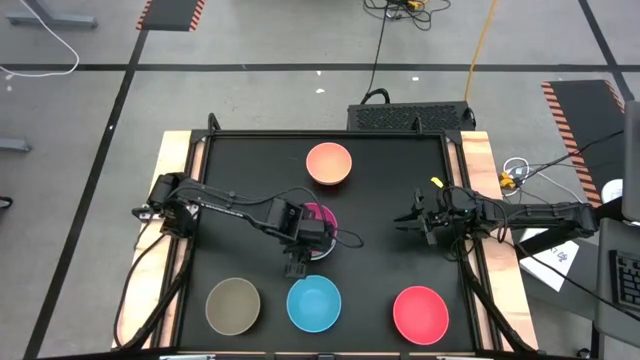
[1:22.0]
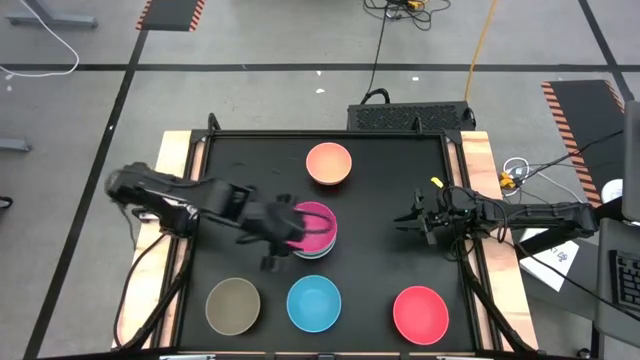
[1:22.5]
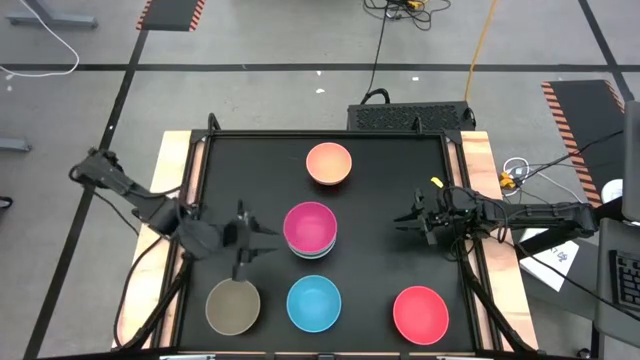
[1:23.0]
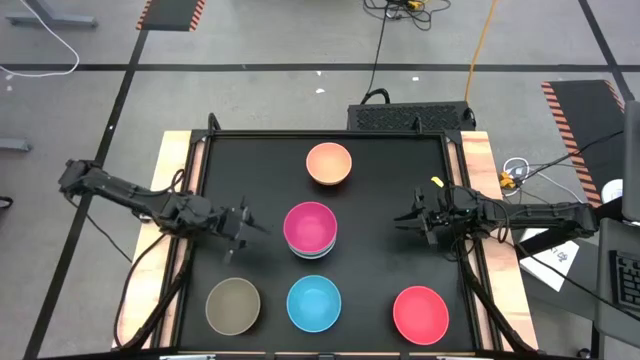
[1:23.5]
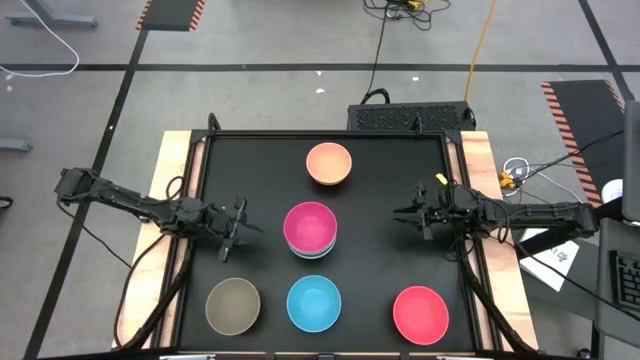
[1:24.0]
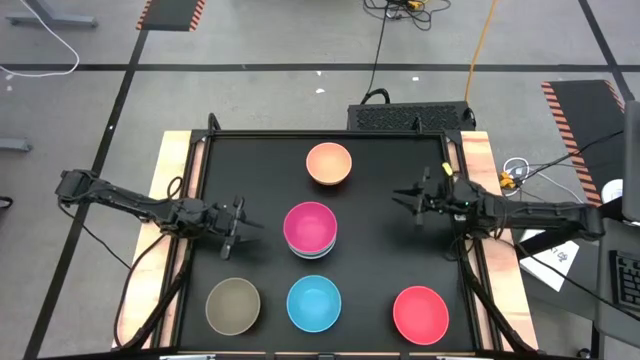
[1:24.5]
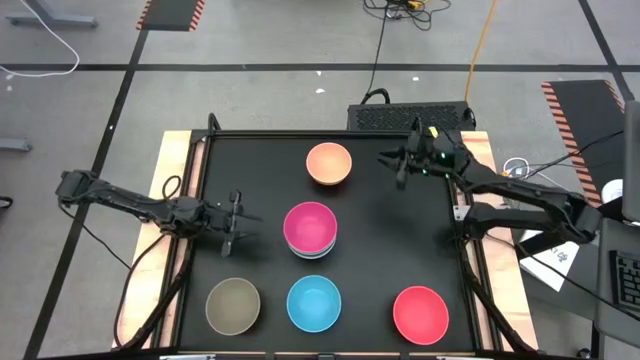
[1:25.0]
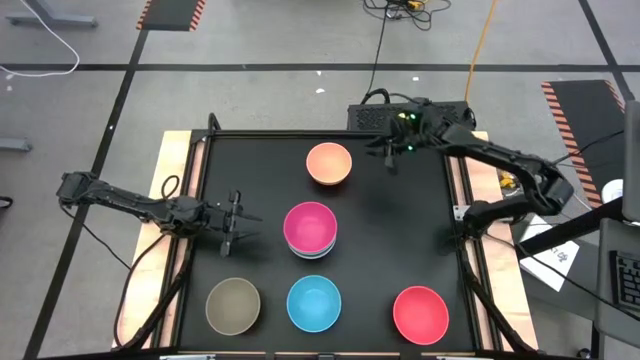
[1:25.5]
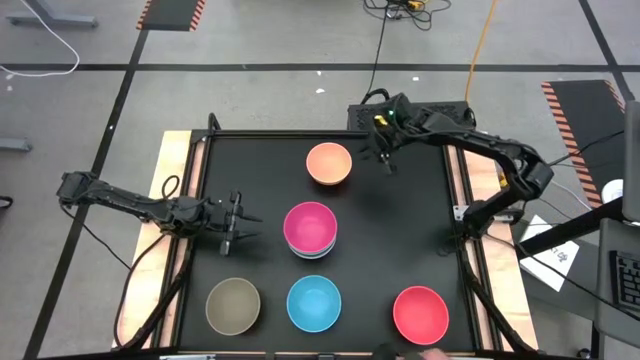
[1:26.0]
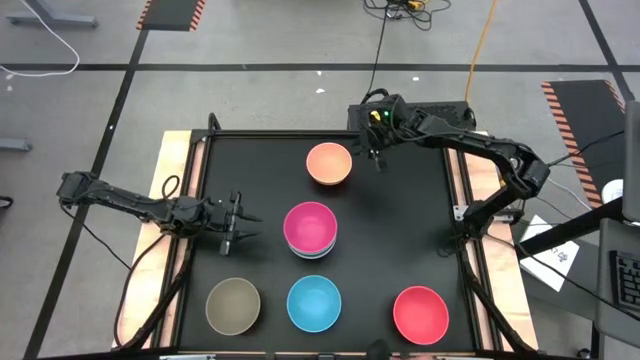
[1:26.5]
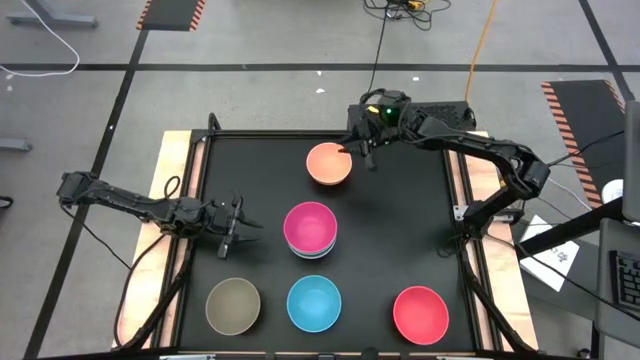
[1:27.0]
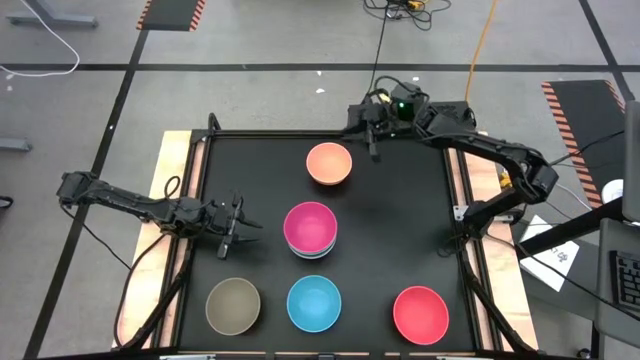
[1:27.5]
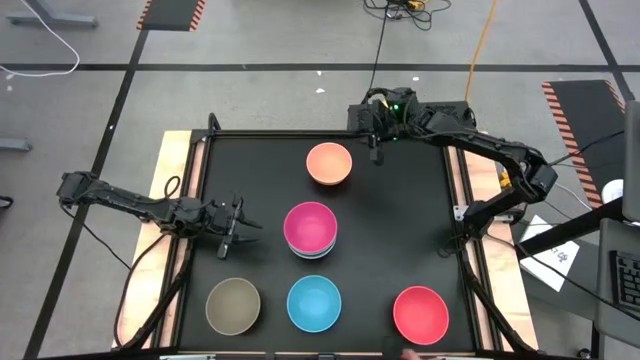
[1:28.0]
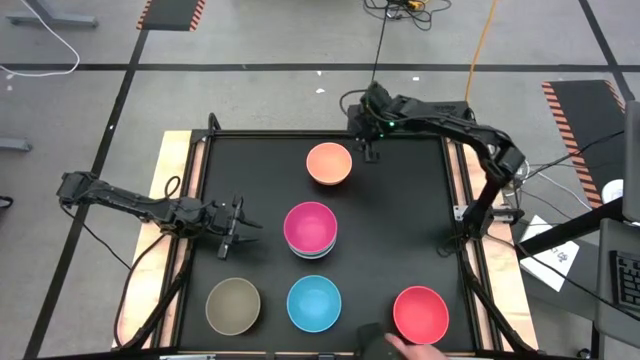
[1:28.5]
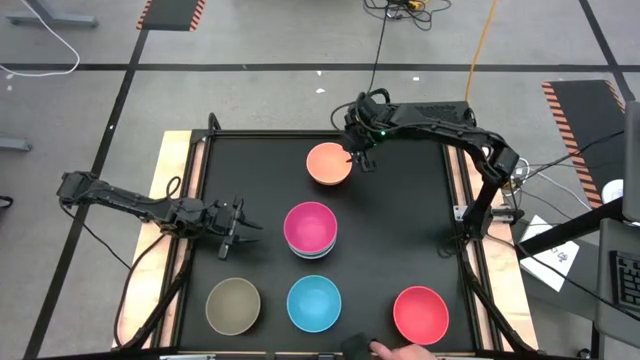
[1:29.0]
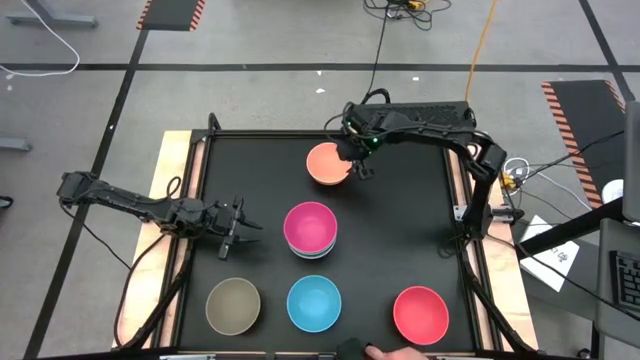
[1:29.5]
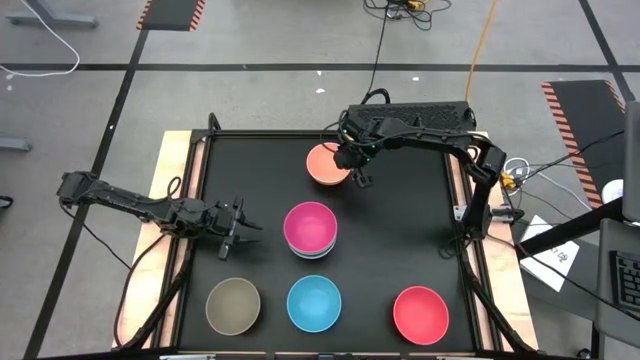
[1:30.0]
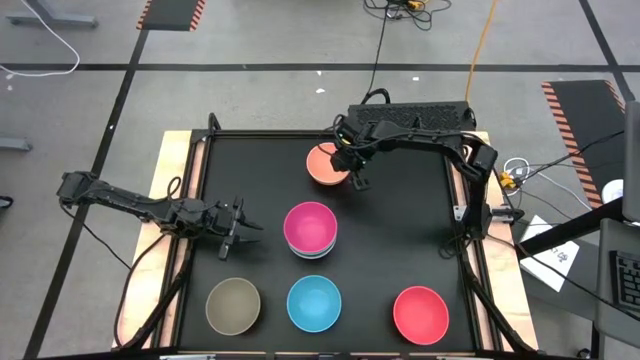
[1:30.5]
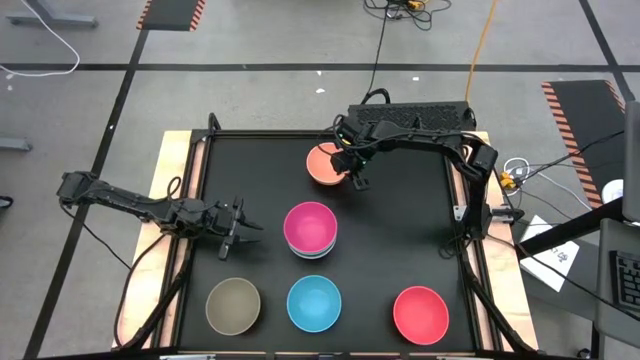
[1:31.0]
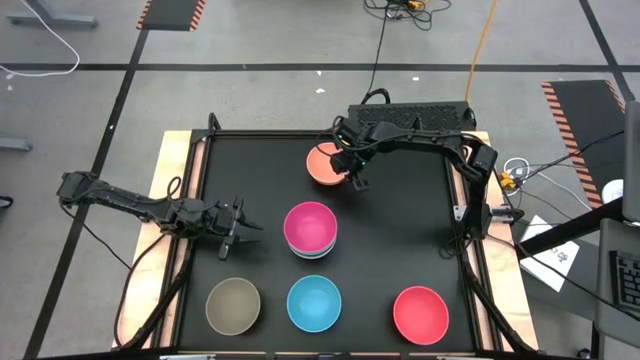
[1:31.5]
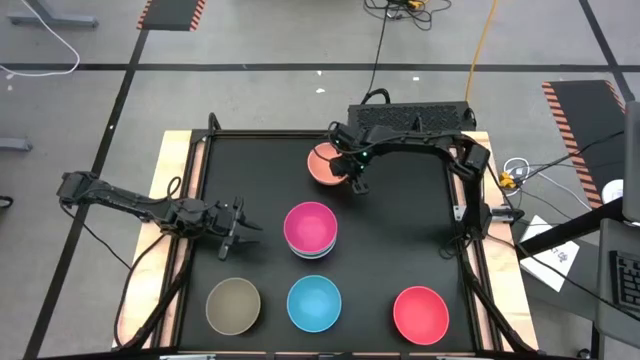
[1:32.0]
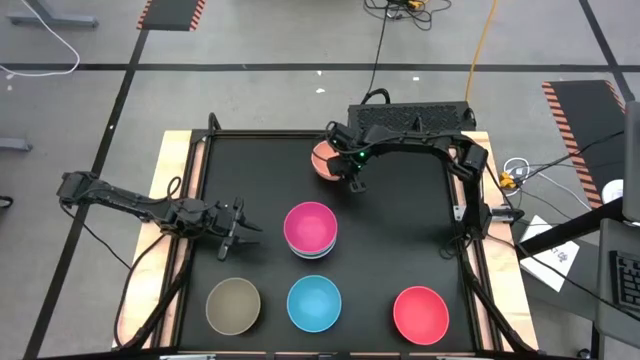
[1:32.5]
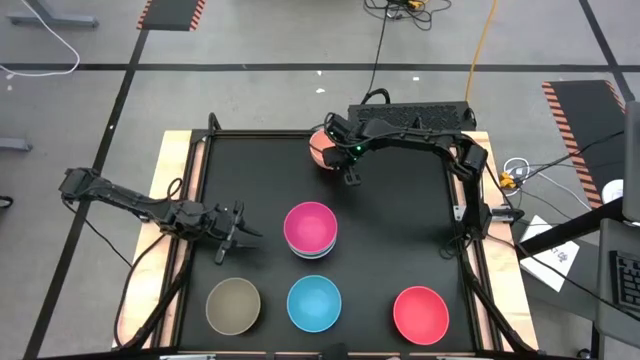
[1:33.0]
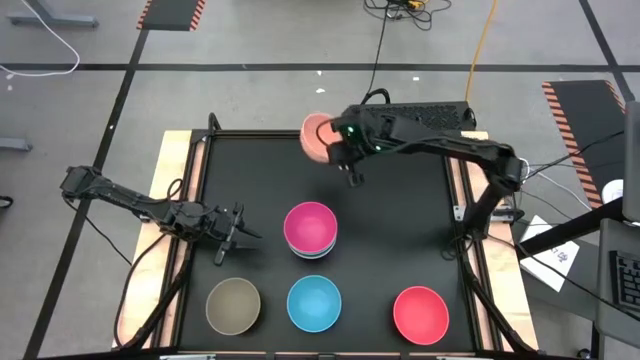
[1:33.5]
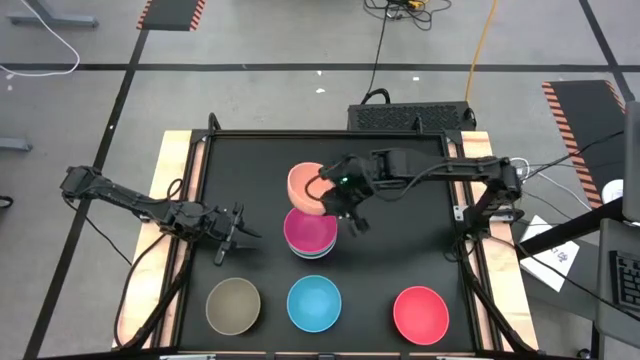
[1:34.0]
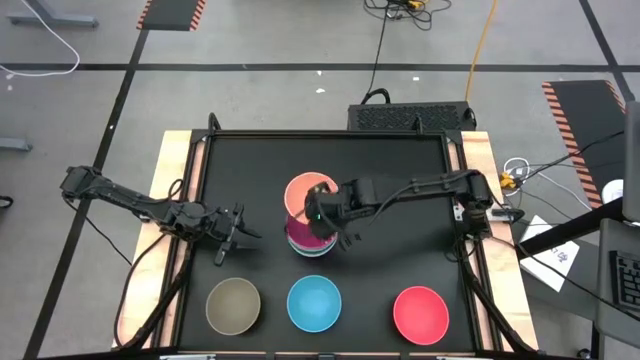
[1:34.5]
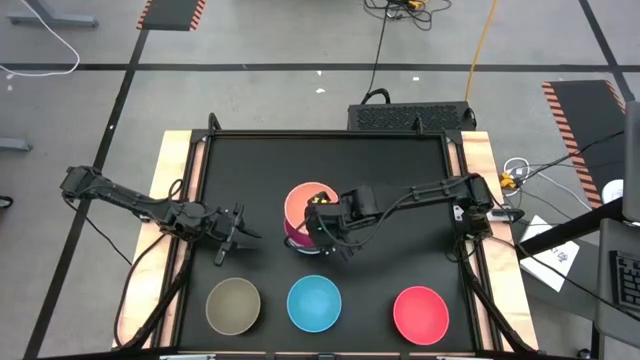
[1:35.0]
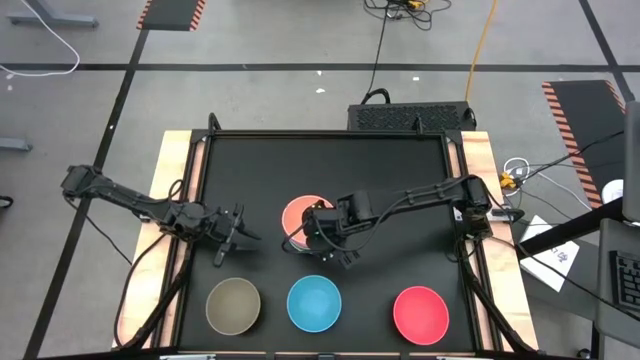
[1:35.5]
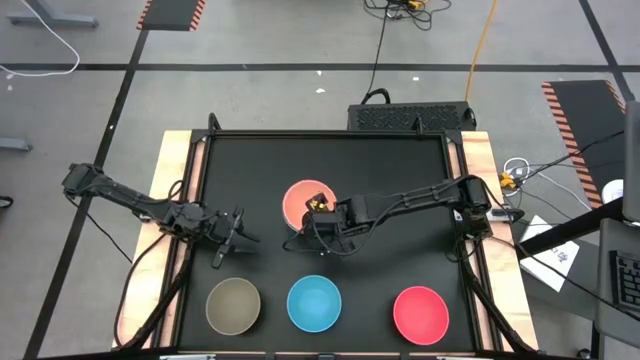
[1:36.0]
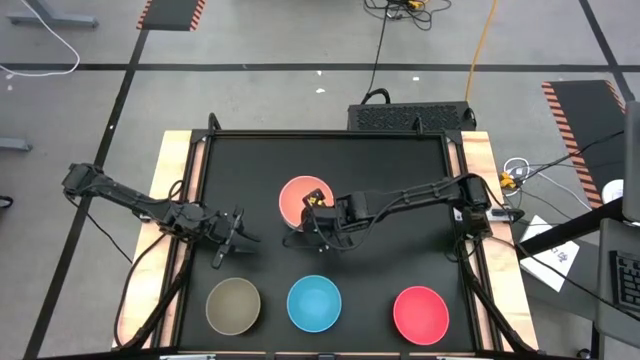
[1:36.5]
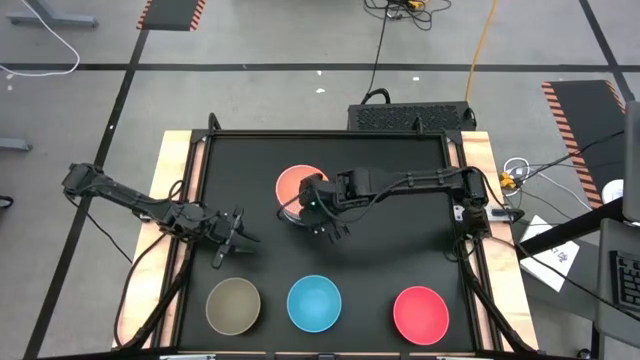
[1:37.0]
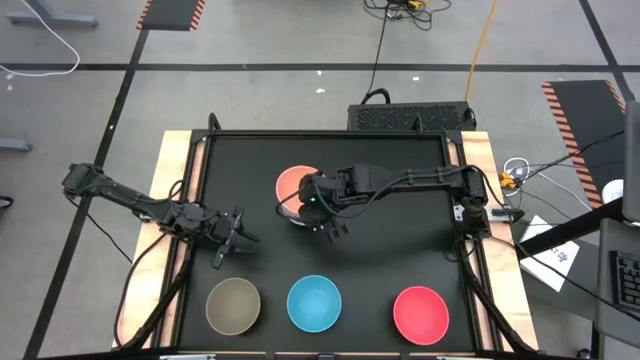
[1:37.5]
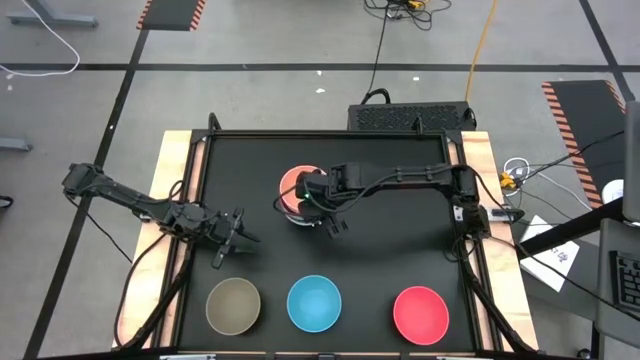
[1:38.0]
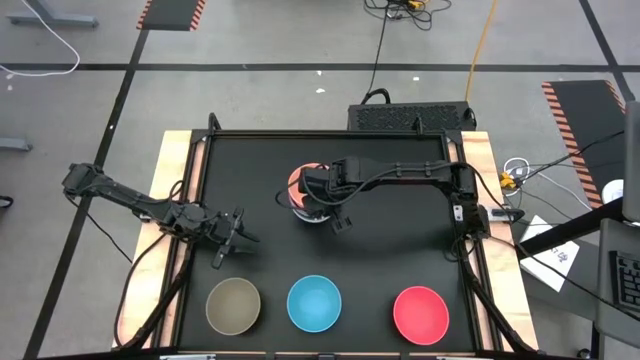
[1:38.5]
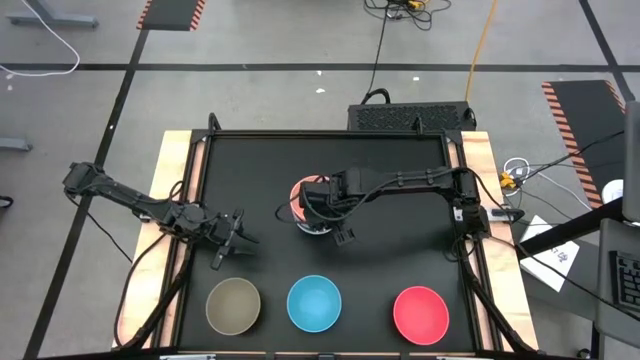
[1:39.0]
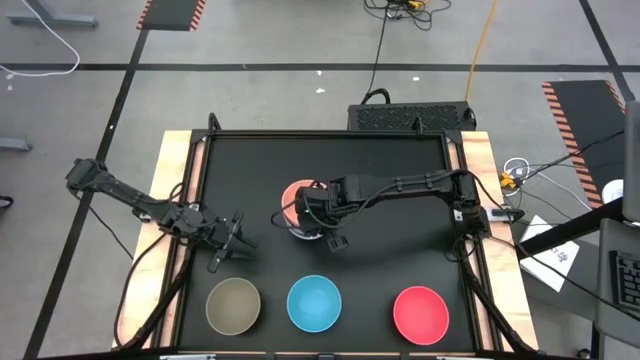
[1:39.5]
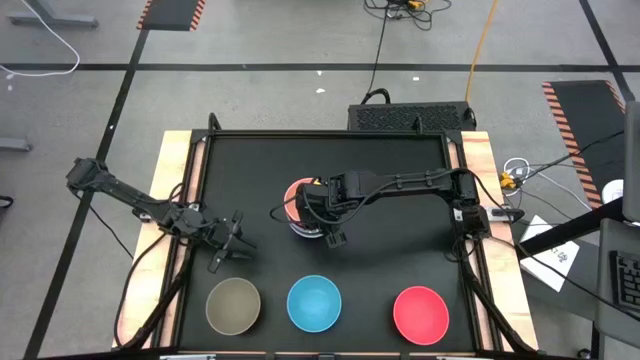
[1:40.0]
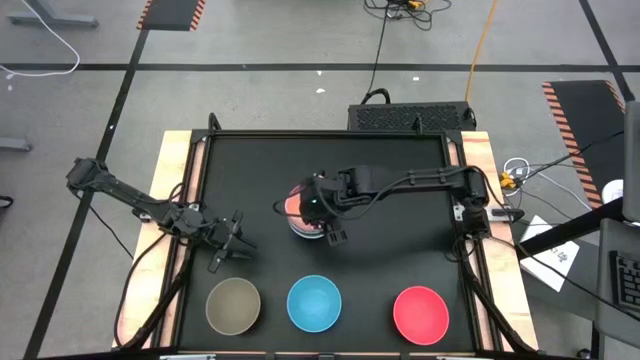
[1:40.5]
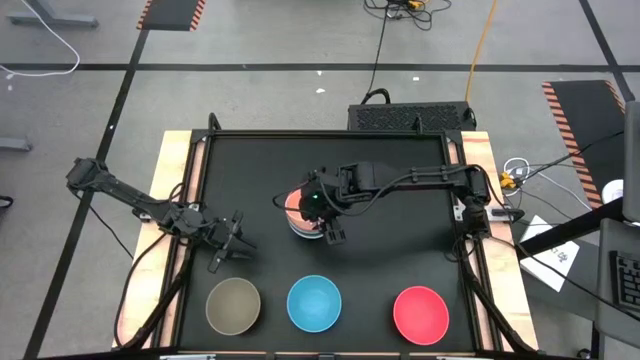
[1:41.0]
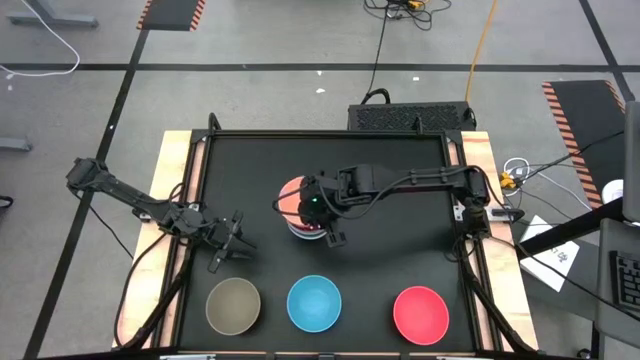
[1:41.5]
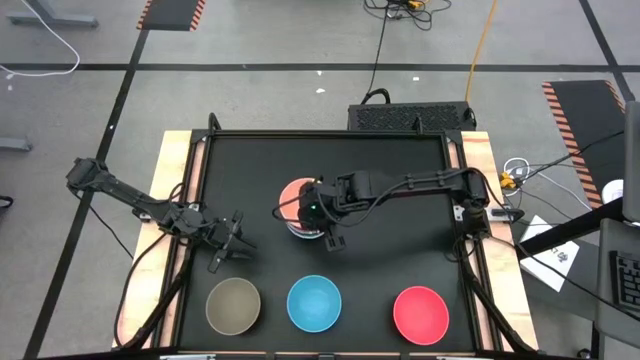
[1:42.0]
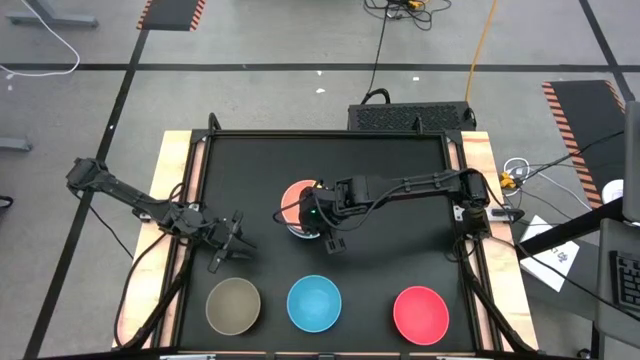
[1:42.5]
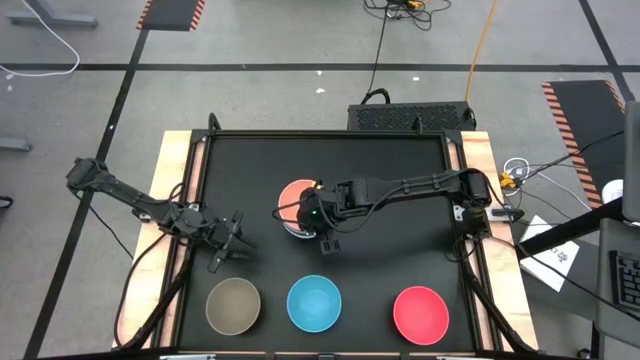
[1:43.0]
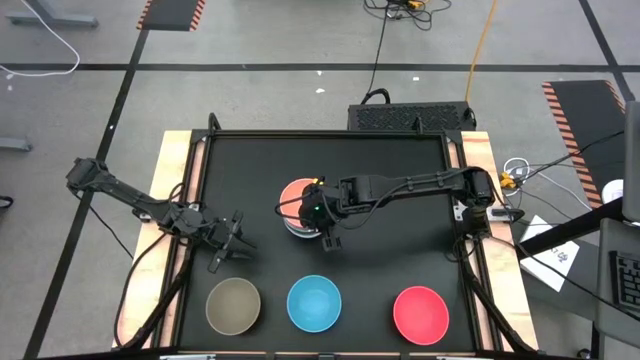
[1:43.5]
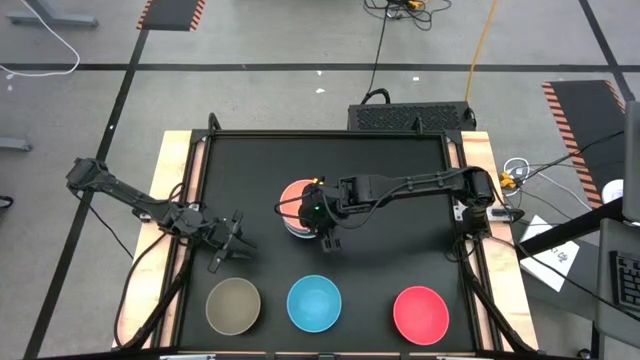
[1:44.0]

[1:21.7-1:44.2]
Task: Nest bowls inside each other
Stack the orange bowl on the pink bowl
